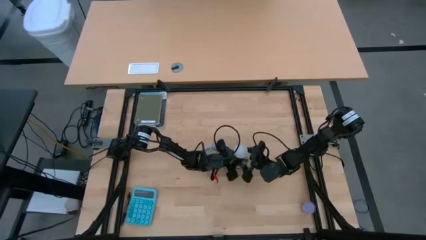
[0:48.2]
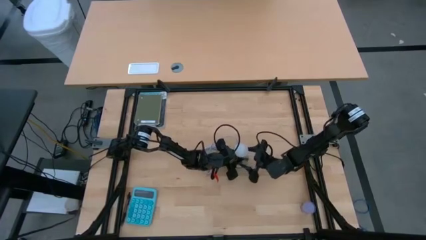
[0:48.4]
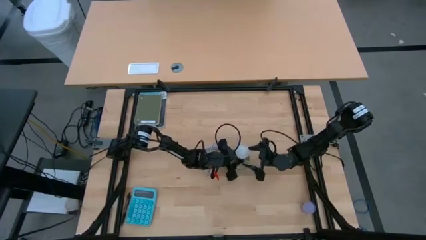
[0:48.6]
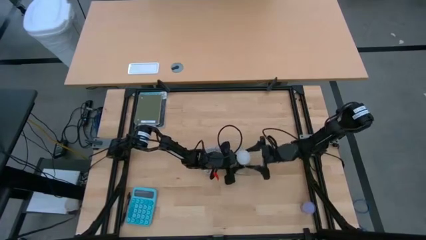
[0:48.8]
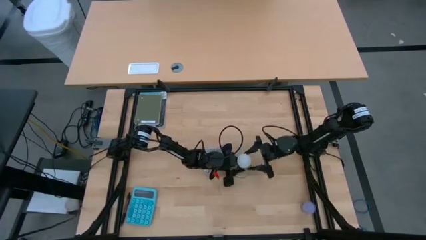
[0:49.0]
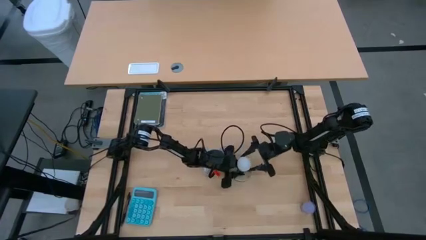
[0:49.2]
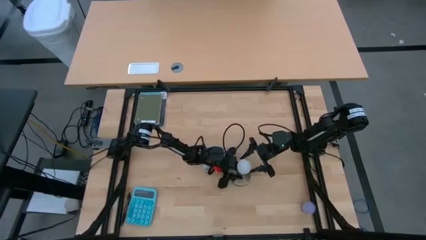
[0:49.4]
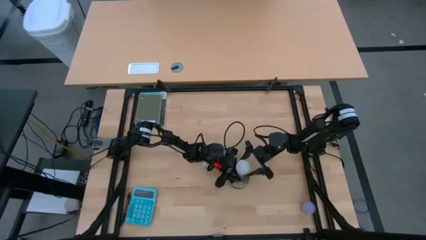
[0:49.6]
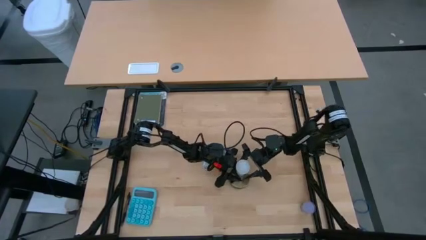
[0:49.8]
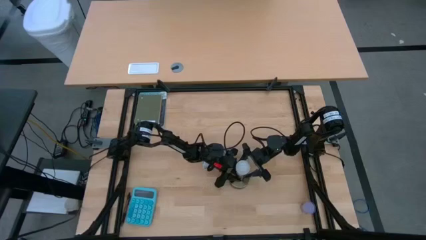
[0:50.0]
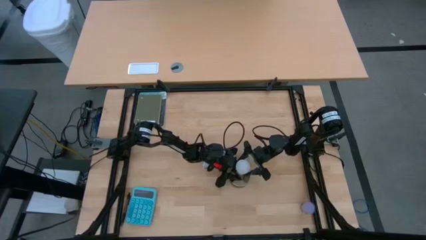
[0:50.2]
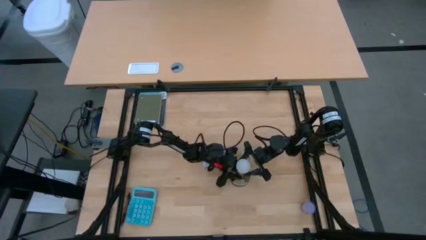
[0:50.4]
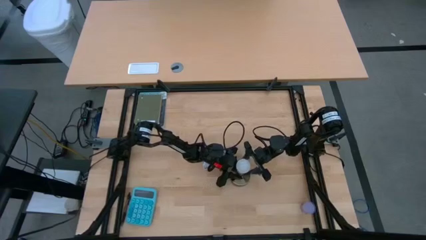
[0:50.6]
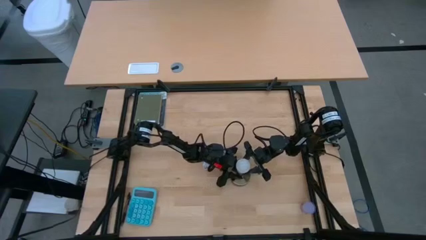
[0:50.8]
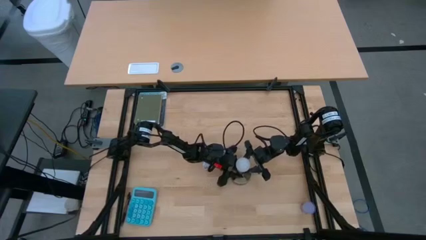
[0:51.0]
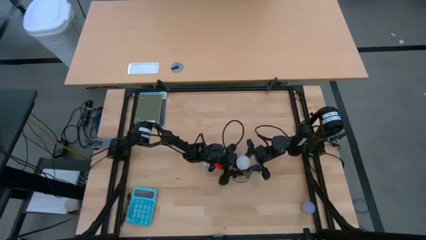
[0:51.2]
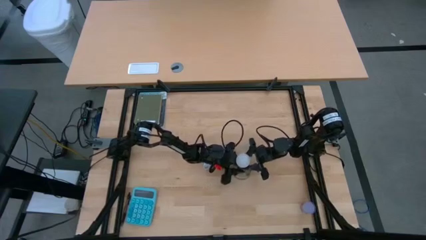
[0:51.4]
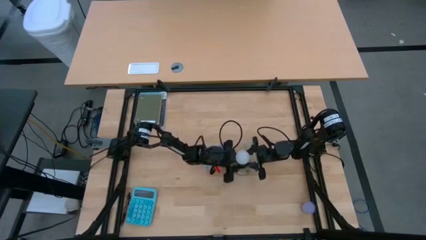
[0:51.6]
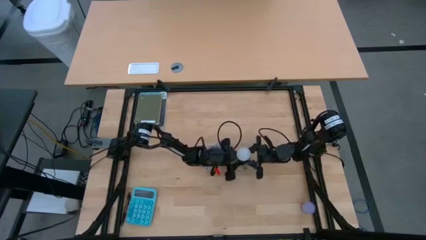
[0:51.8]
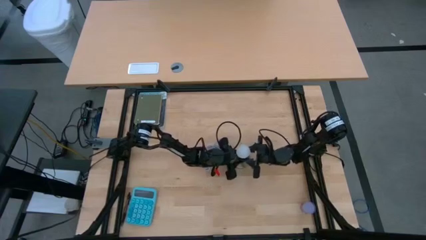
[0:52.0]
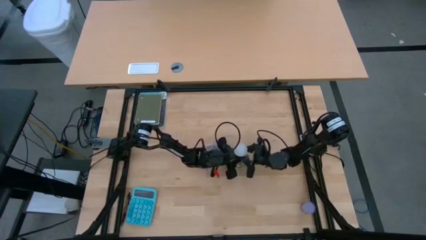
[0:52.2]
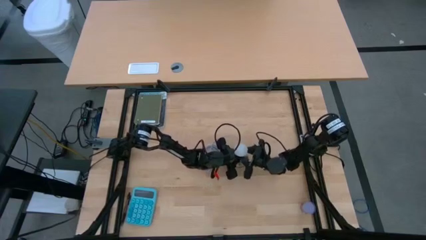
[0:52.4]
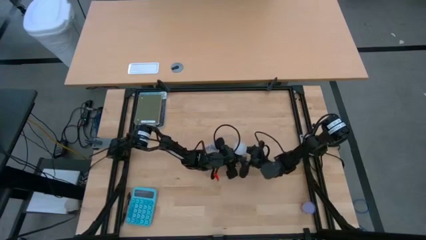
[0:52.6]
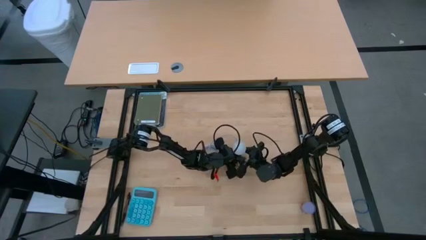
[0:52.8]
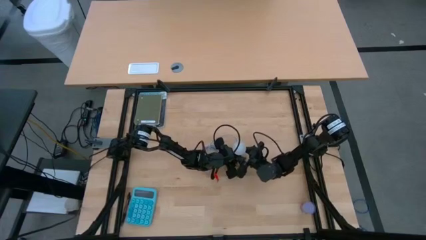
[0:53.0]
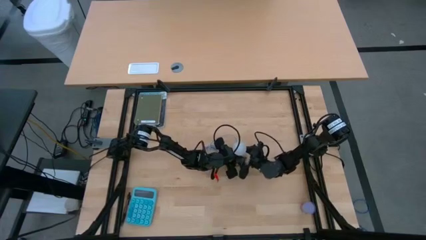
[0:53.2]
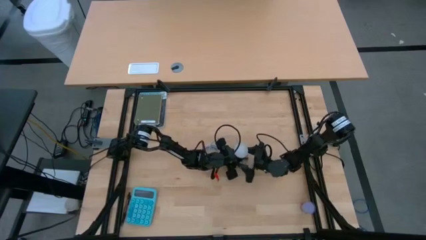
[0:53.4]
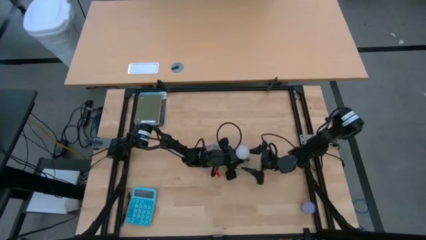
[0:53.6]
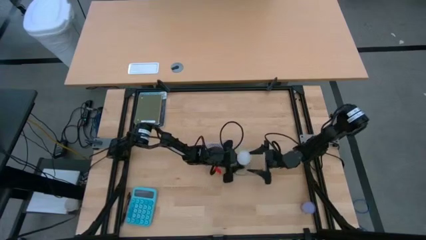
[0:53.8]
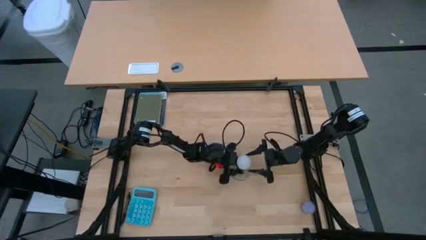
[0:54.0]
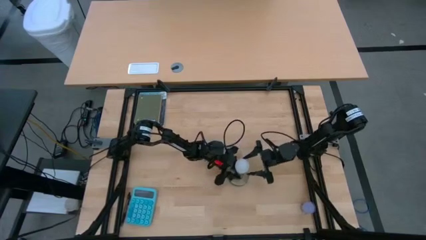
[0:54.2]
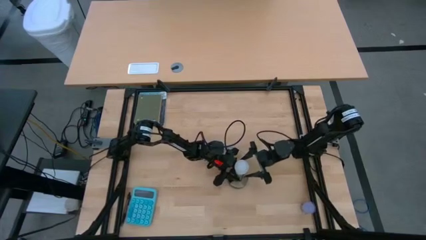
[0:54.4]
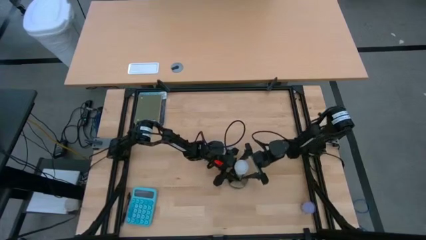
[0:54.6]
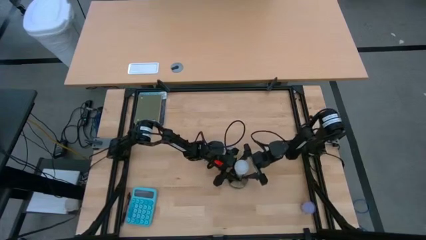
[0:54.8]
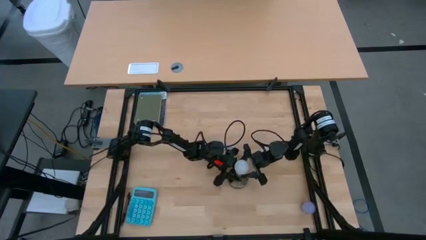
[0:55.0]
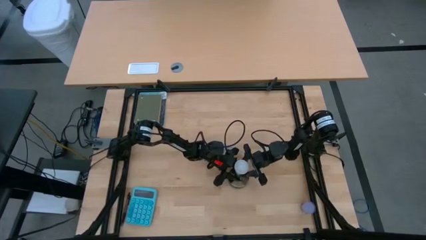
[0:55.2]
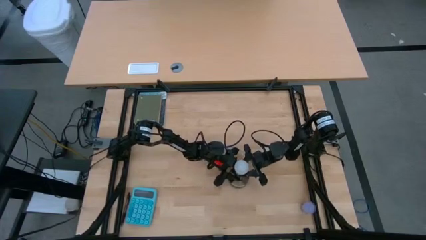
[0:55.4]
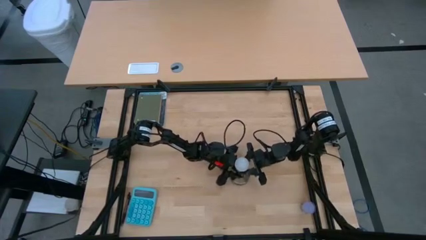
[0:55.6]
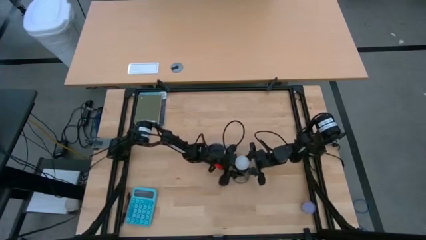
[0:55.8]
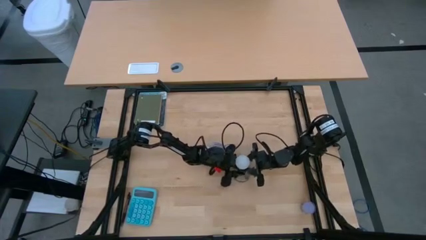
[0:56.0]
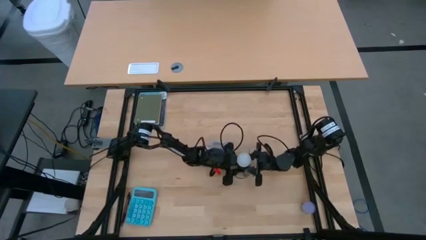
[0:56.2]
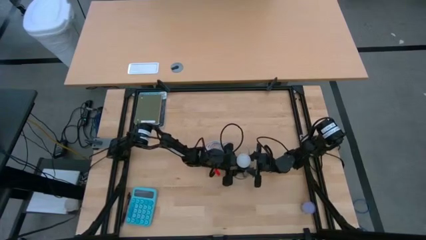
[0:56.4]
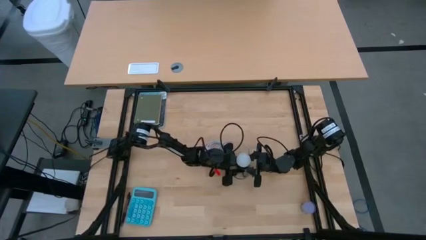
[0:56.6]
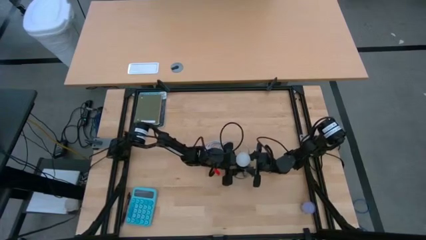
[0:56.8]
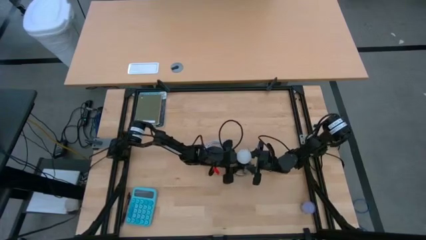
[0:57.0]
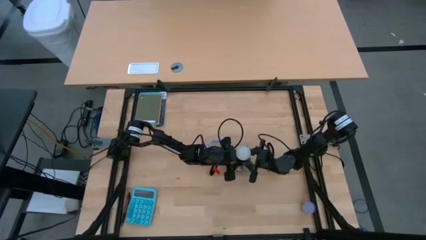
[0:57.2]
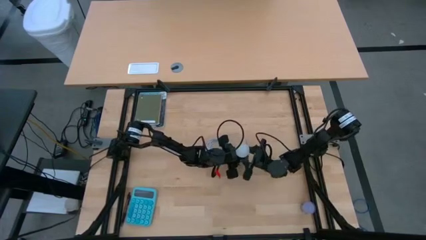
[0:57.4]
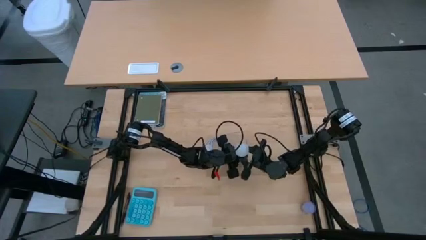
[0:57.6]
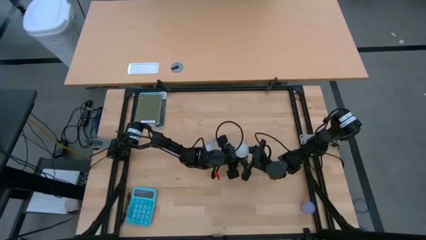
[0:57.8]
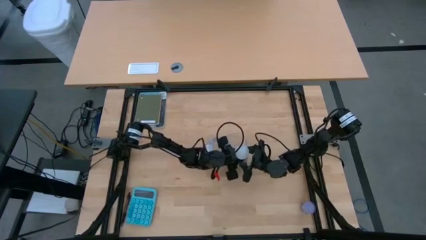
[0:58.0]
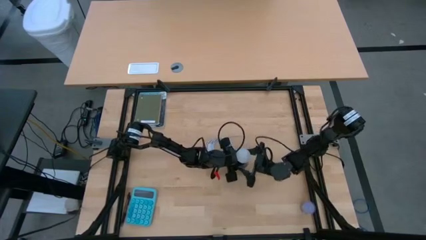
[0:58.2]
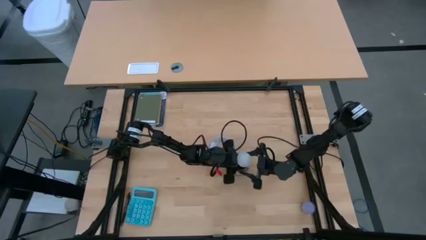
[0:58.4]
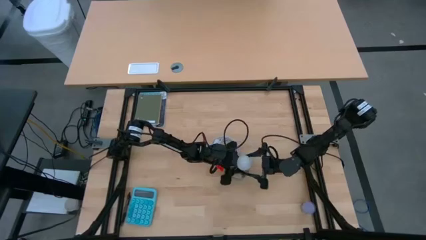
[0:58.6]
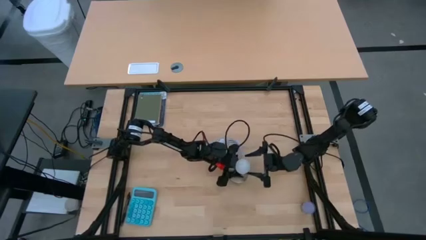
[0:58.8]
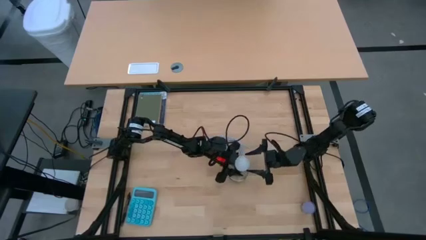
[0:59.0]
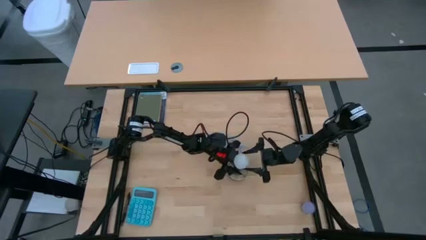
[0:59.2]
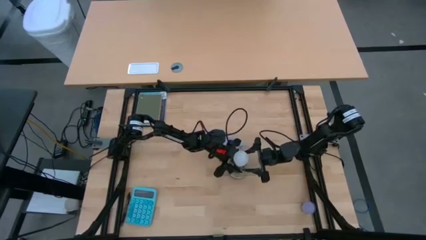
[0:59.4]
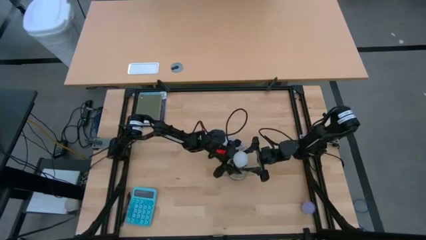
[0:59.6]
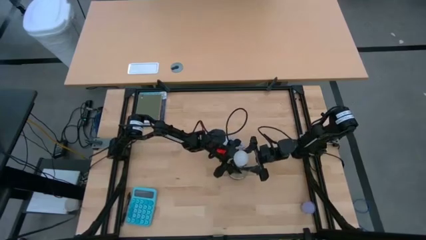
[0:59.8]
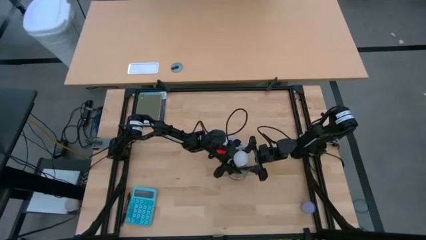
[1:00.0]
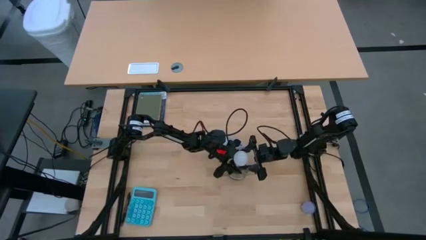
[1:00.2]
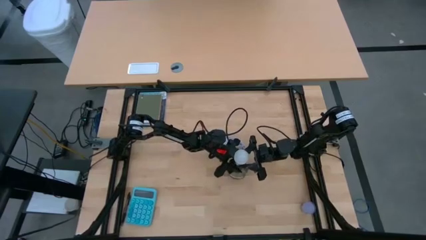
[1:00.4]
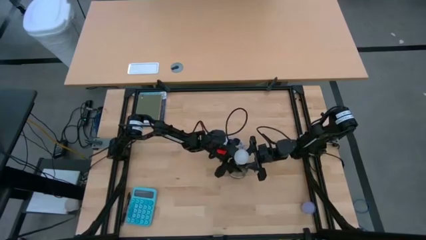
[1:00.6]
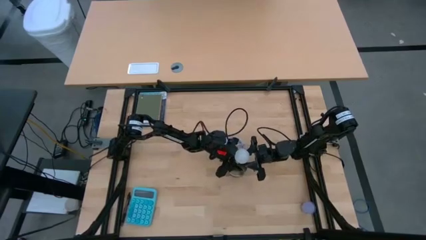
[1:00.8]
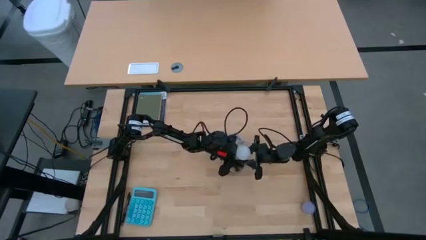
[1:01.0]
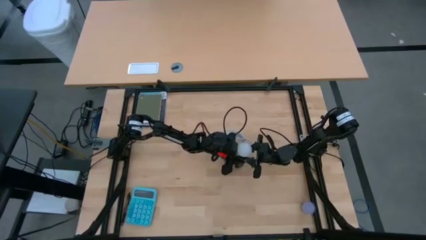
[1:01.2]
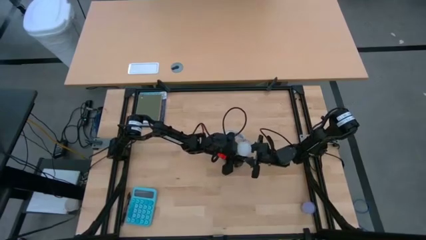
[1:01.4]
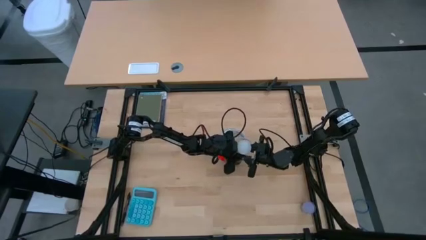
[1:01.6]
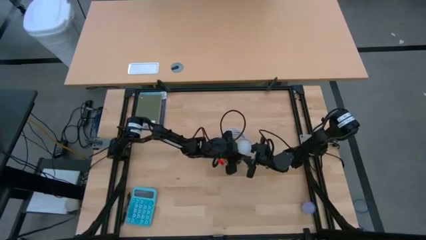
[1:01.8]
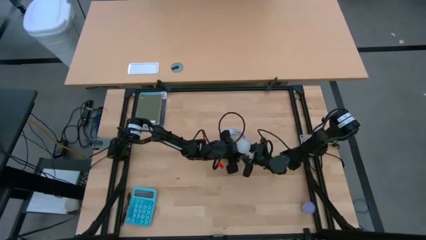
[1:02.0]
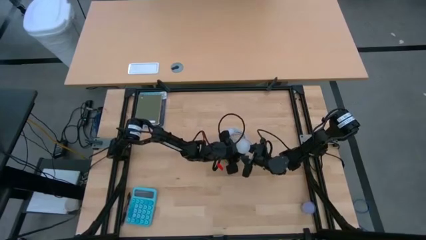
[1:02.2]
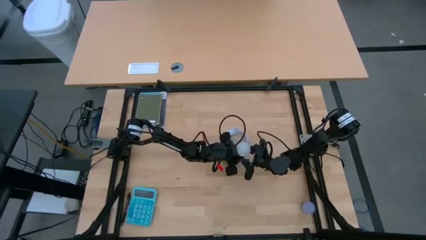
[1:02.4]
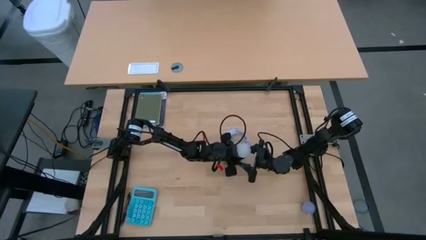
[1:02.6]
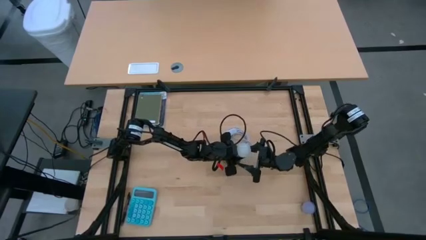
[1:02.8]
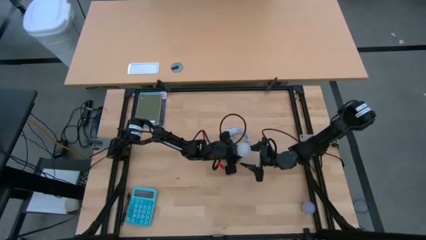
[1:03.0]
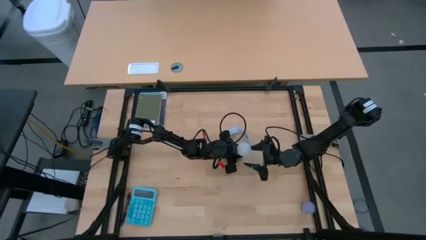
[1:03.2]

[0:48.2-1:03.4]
Task: Screw lightbulb
Insert the lightbulb into the lamp
